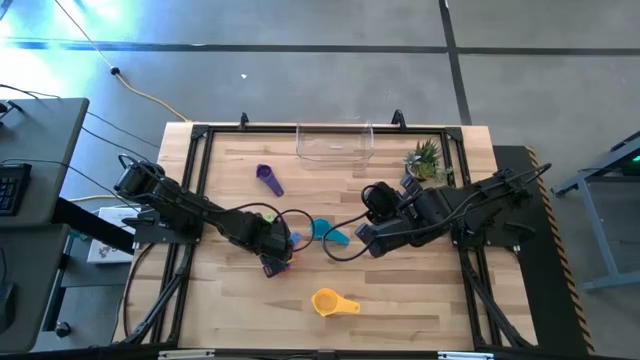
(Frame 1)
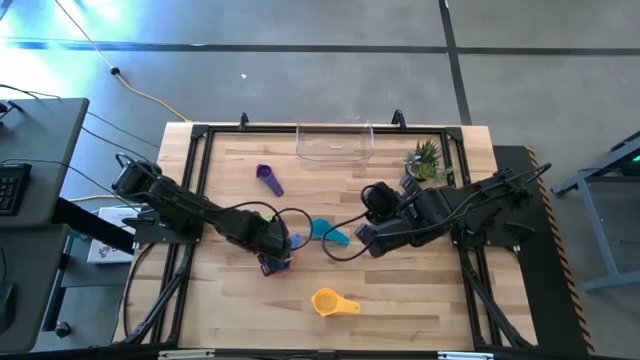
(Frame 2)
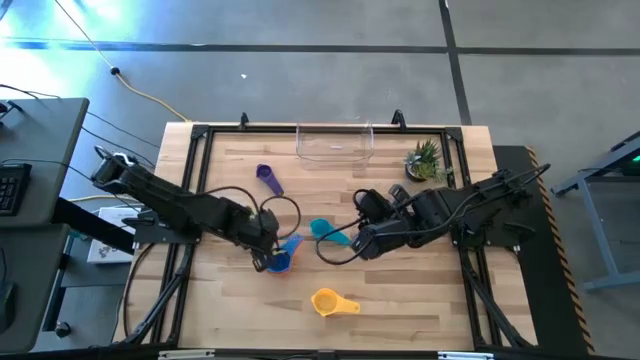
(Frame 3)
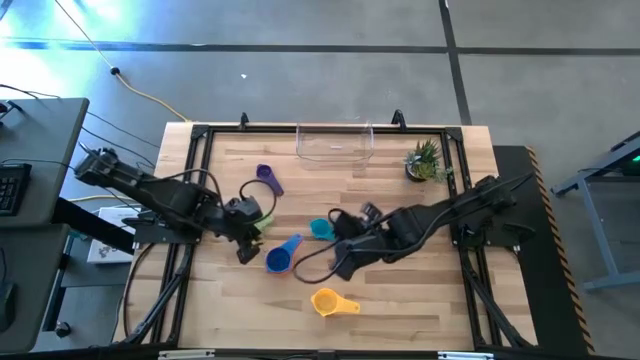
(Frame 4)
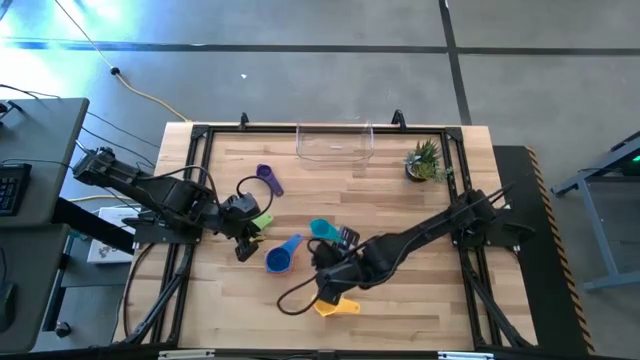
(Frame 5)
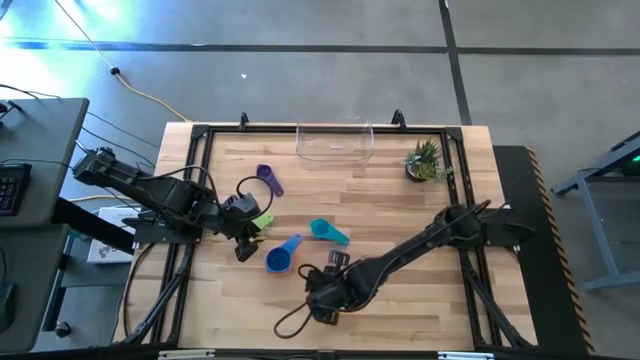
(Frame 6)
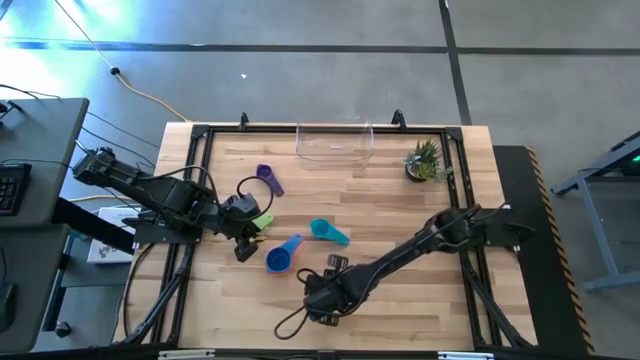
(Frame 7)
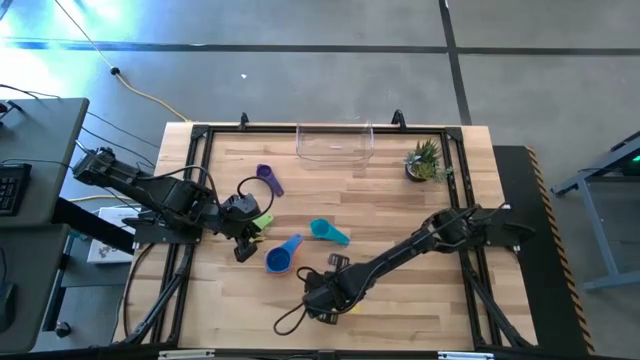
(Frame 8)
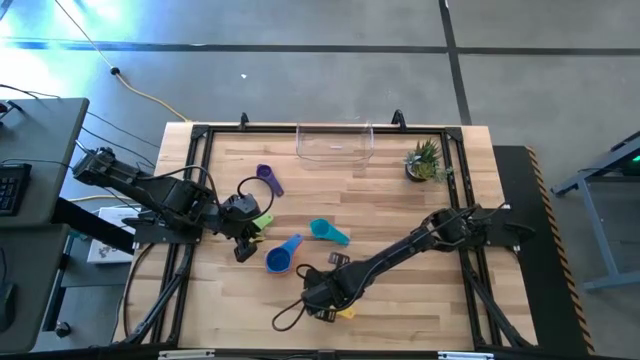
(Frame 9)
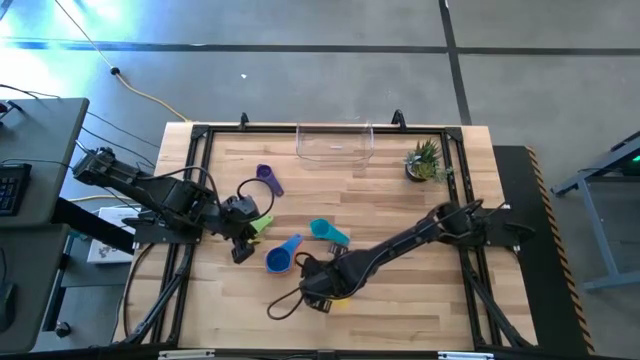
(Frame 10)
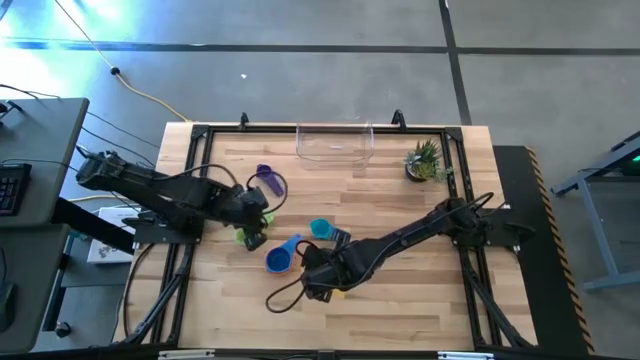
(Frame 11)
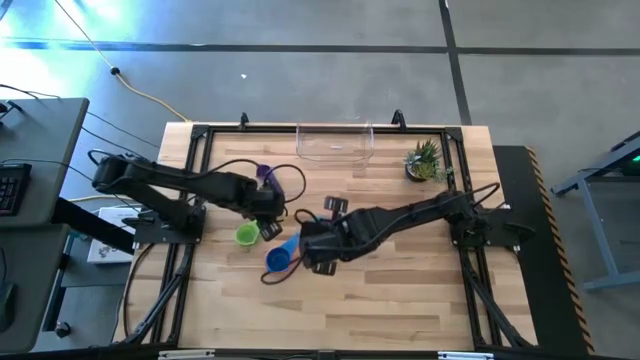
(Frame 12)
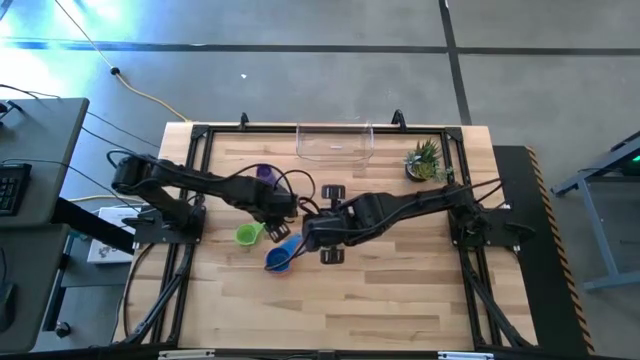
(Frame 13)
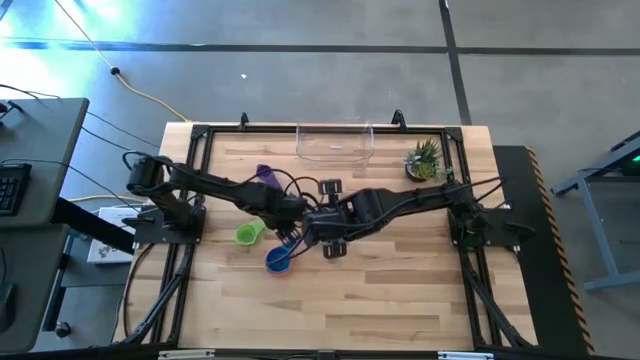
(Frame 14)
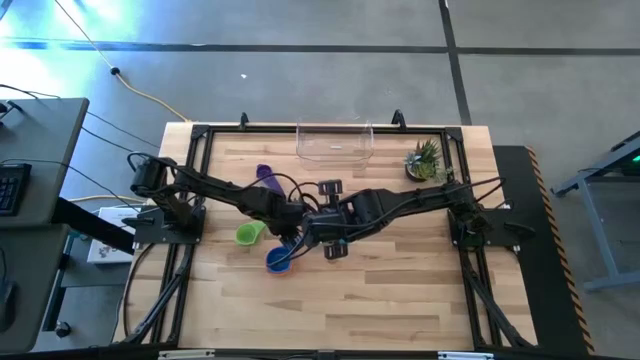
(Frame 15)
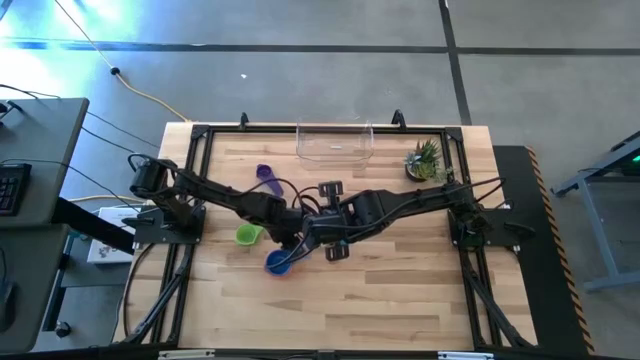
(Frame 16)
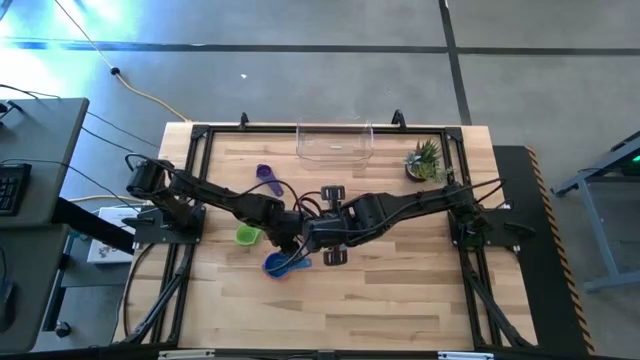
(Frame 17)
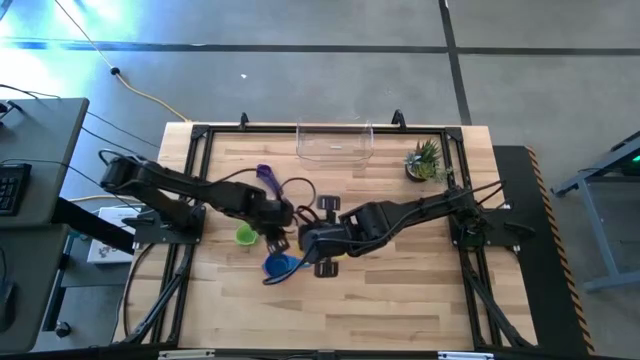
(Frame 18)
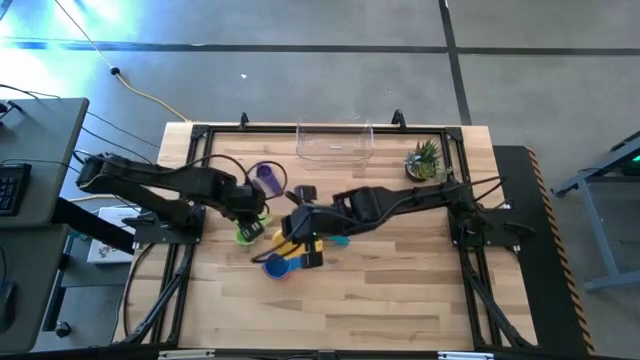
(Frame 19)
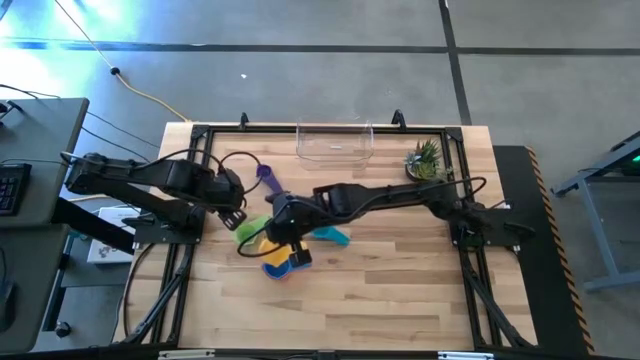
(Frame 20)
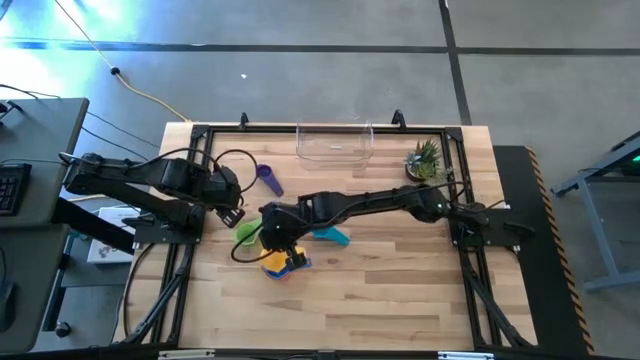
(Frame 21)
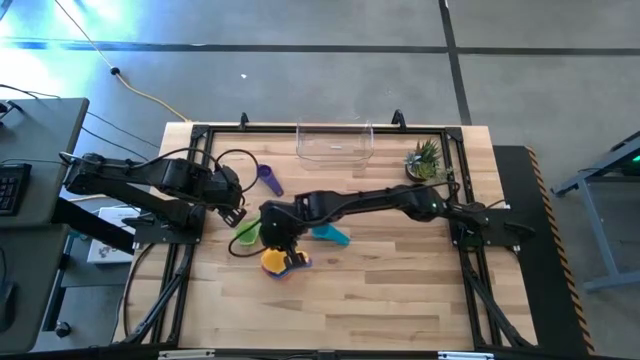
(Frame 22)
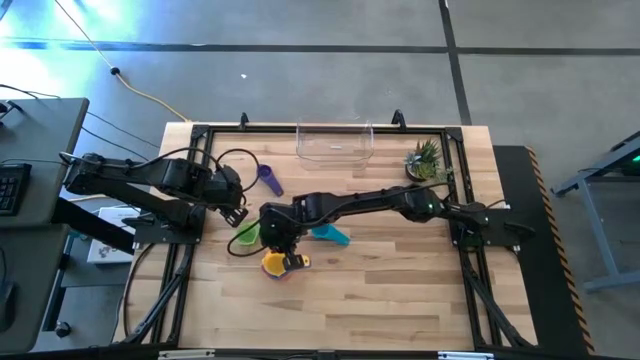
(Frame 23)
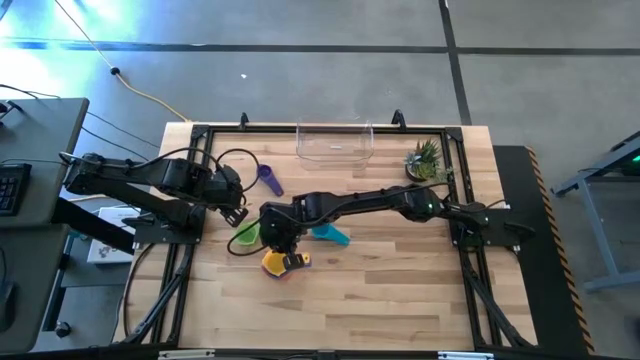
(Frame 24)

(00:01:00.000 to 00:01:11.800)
Task: Nest measuring cups in basket
Stack the yellow measuring cup on top of the blue measuring cup

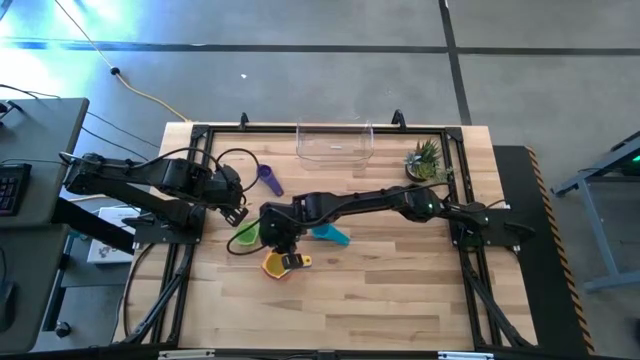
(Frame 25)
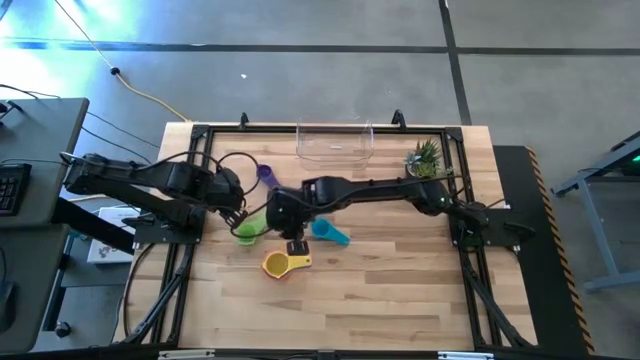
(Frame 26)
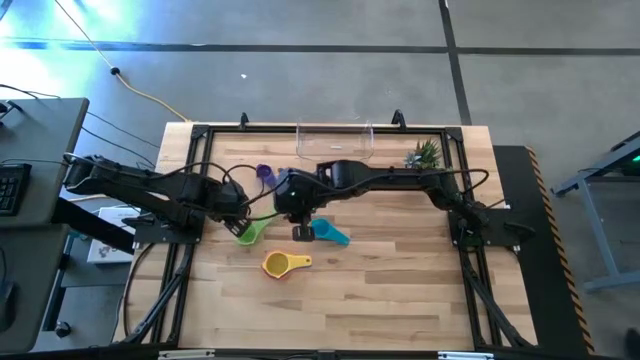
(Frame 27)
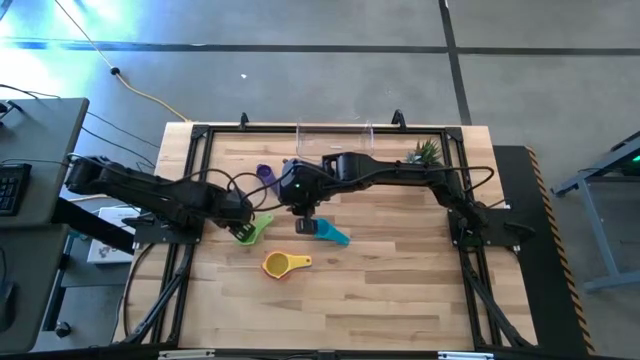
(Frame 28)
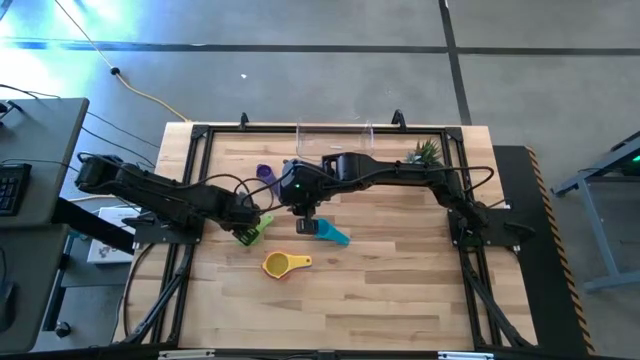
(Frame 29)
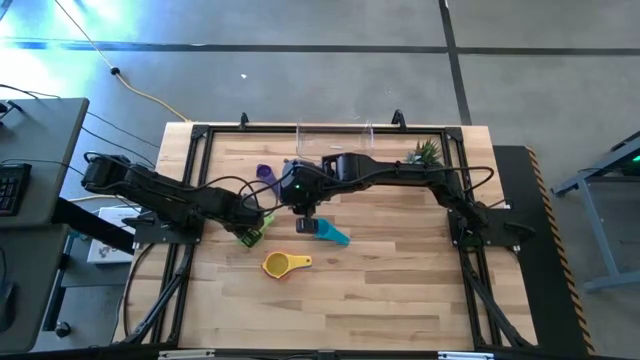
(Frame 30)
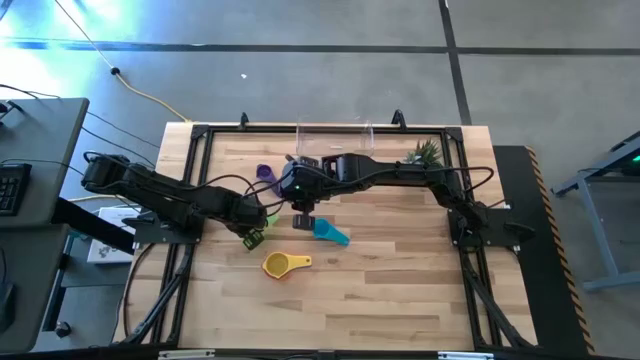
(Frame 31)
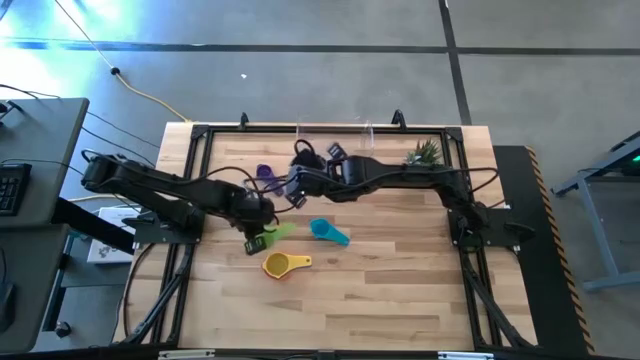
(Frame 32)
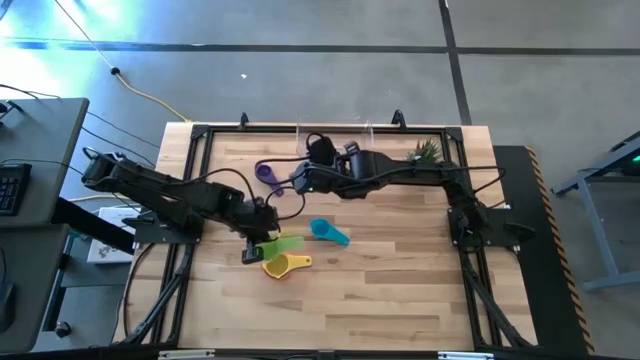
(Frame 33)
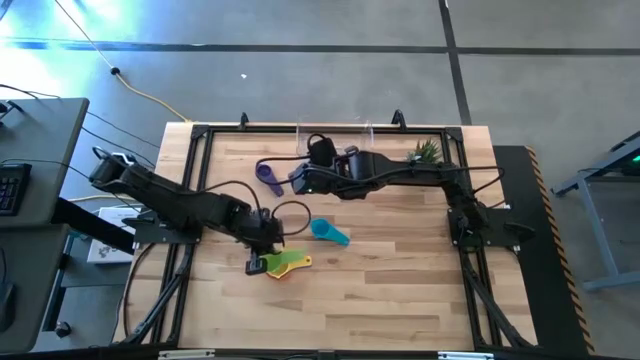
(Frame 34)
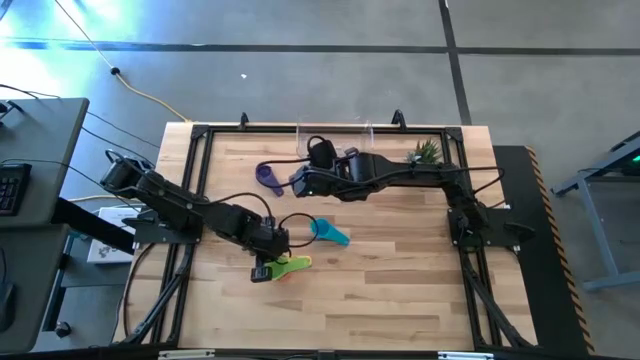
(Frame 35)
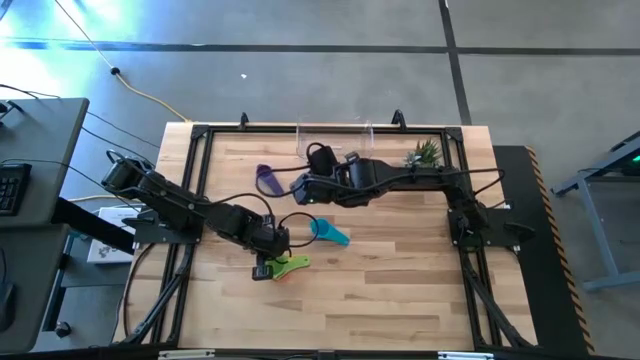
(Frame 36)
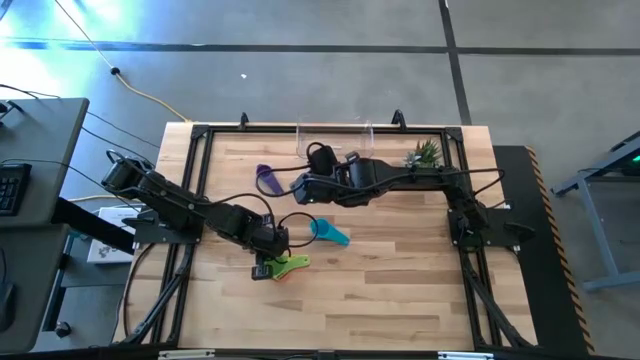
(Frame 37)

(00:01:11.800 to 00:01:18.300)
Stack the green measuring cup on top of the yellow measuring cup

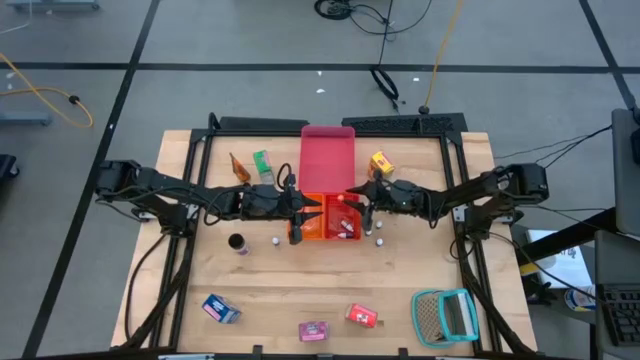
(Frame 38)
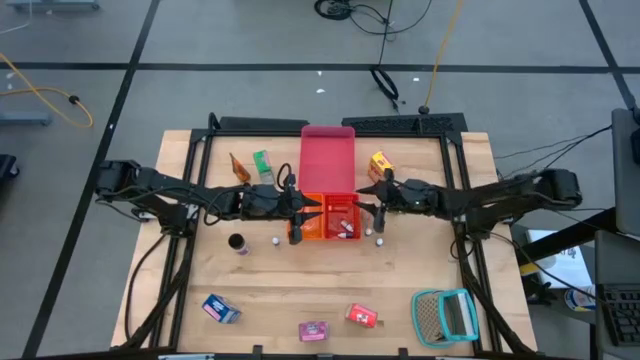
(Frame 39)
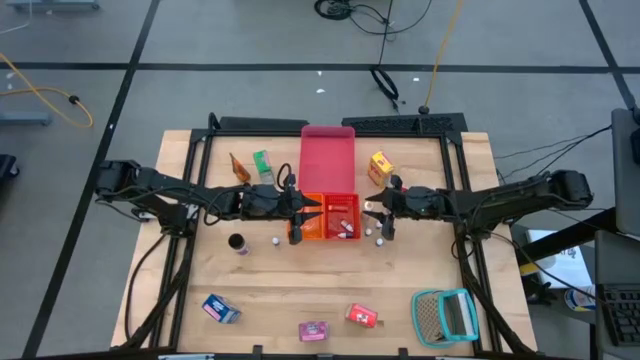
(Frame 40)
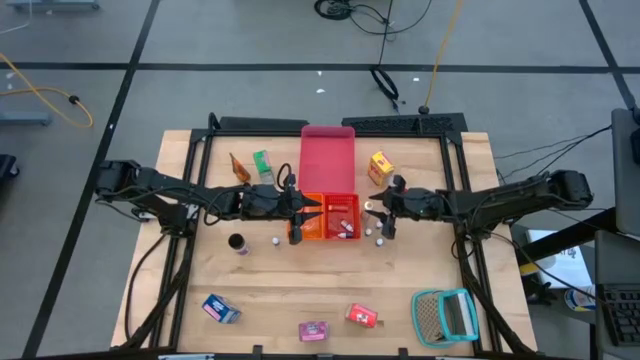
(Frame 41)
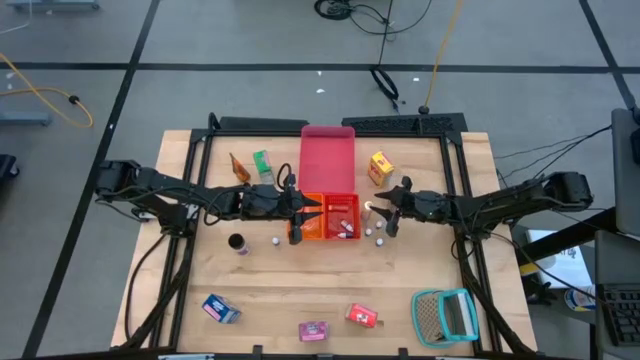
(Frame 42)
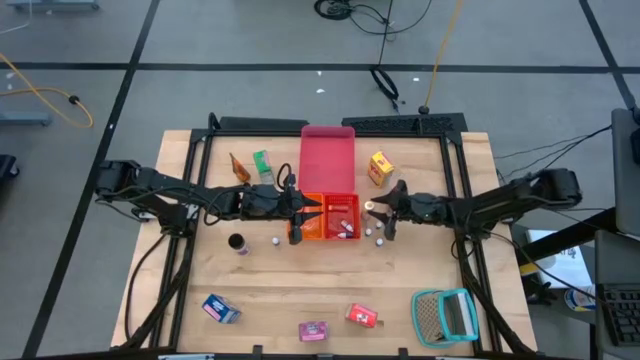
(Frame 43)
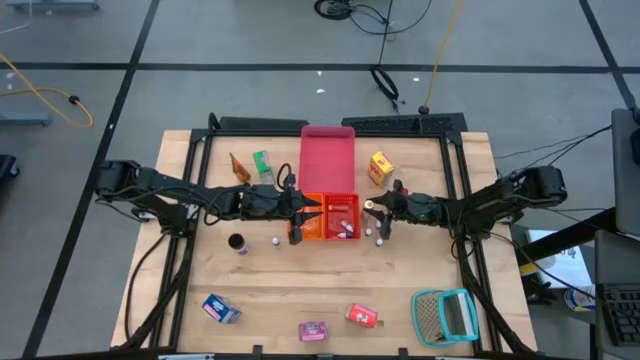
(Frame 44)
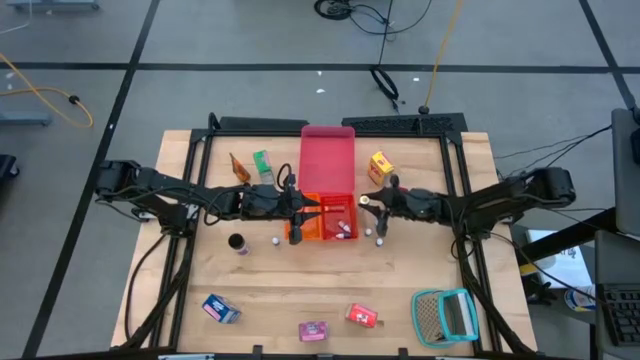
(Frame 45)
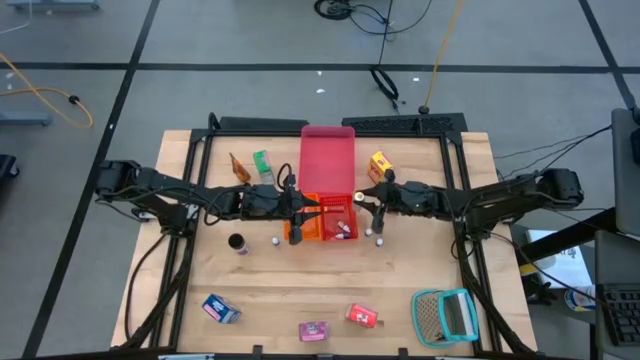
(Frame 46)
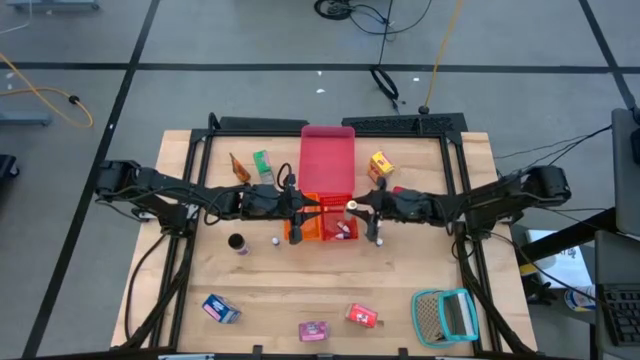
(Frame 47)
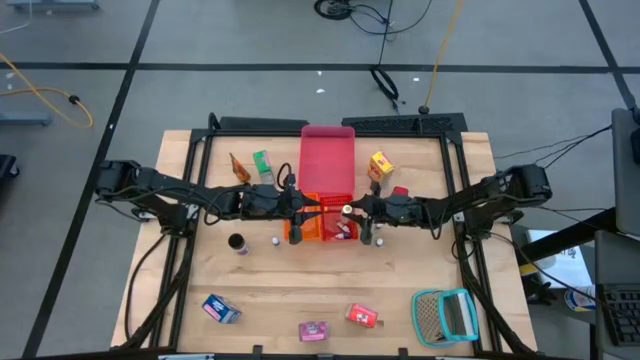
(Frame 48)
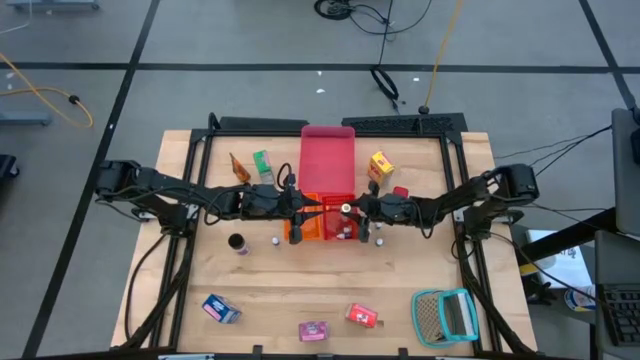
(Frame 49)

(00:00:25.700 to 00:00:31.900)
Task: Pick & Place Kitchen Items
Put the large yellow food coloring bottle into the red basket
